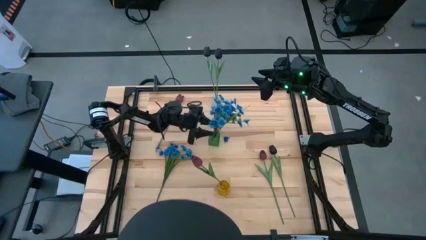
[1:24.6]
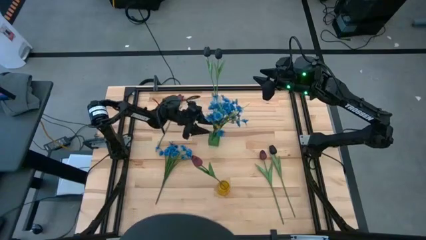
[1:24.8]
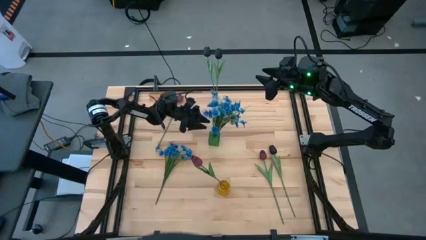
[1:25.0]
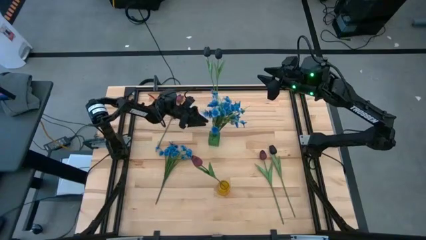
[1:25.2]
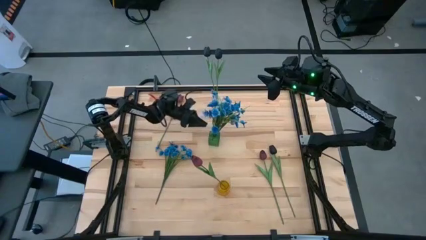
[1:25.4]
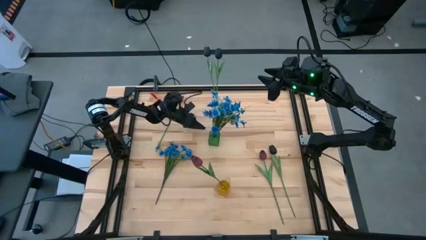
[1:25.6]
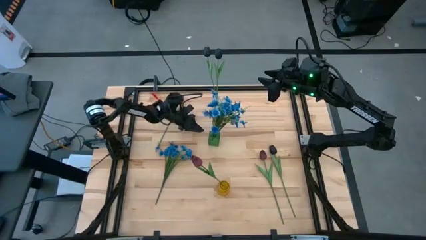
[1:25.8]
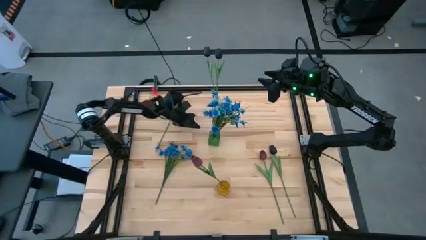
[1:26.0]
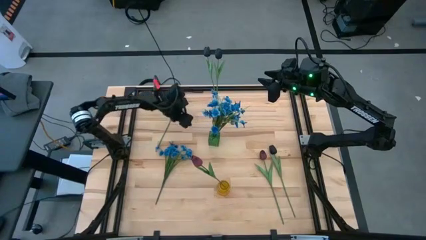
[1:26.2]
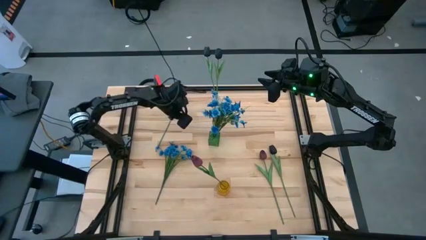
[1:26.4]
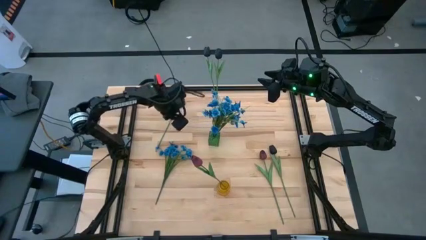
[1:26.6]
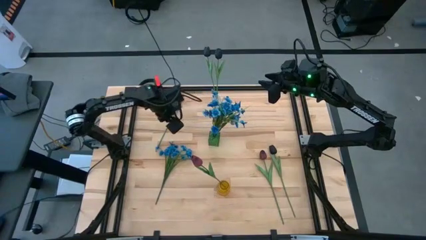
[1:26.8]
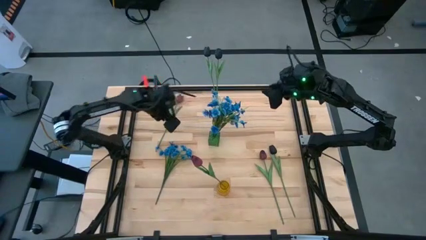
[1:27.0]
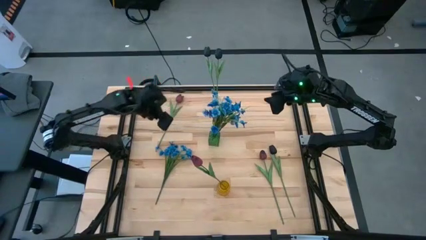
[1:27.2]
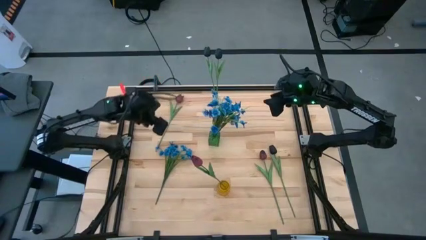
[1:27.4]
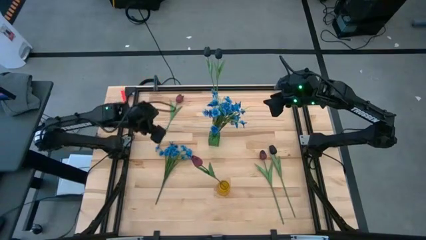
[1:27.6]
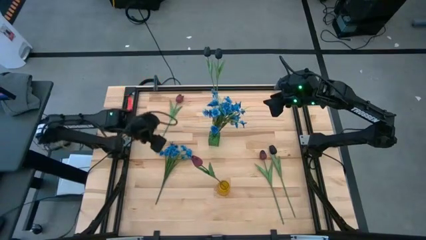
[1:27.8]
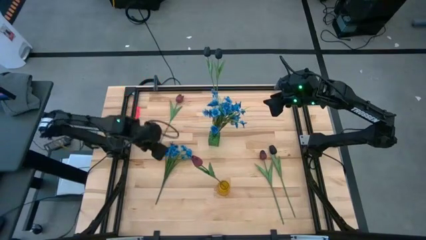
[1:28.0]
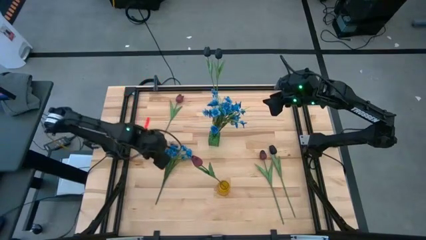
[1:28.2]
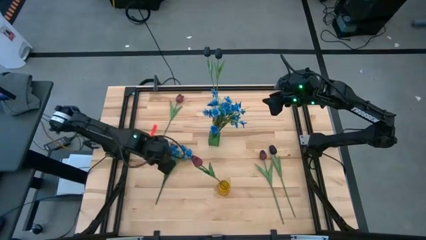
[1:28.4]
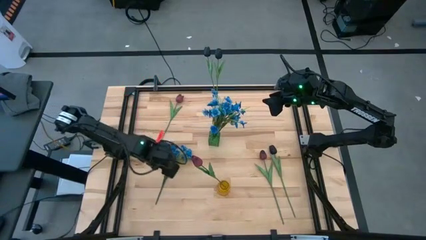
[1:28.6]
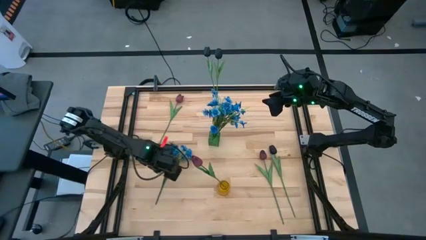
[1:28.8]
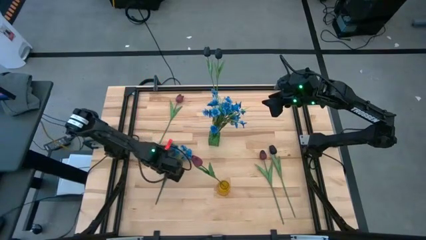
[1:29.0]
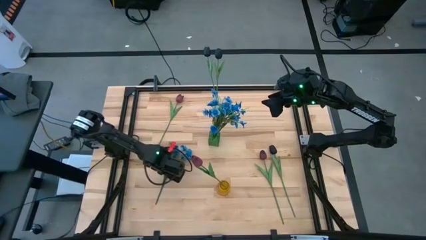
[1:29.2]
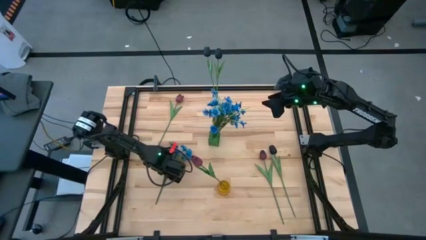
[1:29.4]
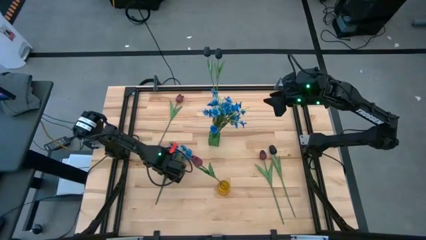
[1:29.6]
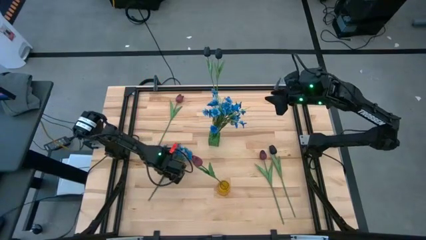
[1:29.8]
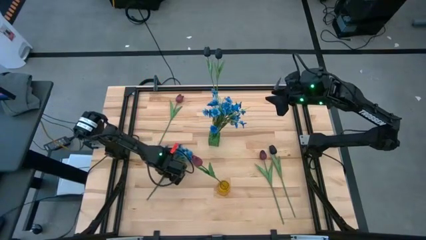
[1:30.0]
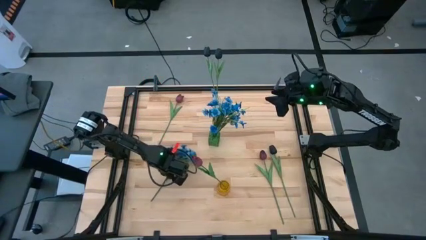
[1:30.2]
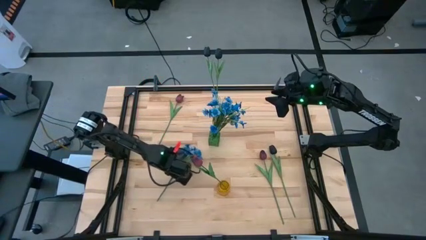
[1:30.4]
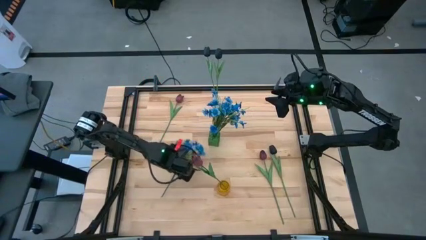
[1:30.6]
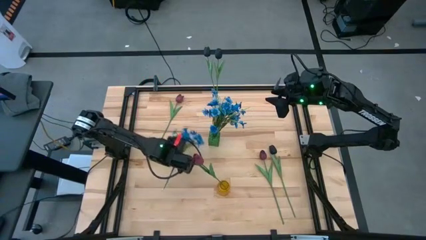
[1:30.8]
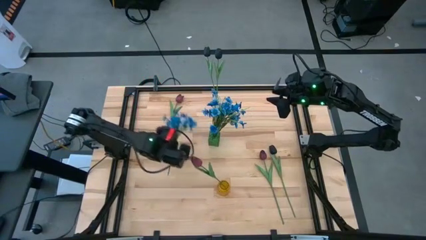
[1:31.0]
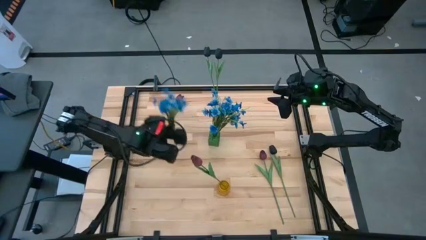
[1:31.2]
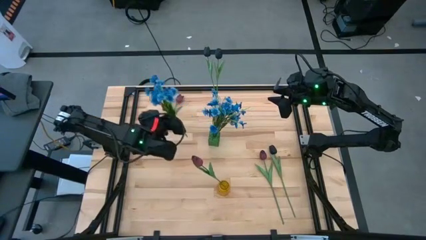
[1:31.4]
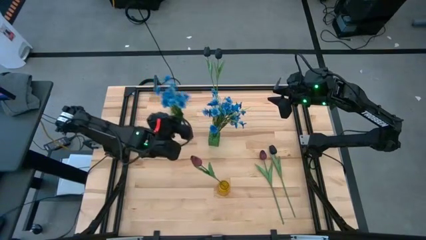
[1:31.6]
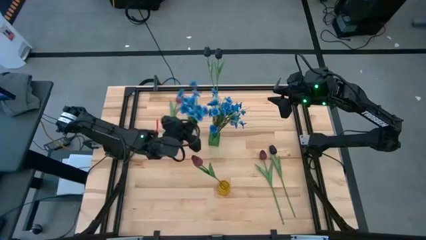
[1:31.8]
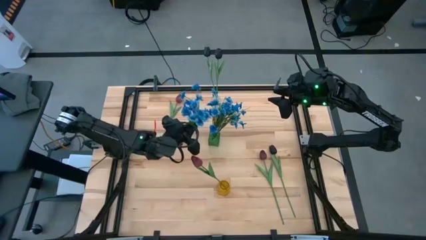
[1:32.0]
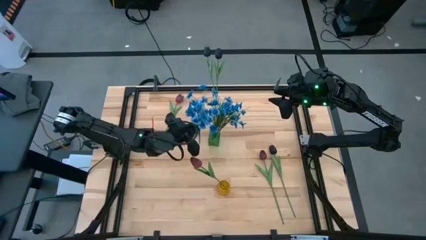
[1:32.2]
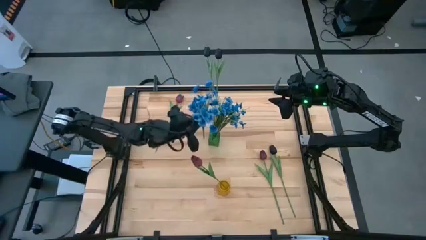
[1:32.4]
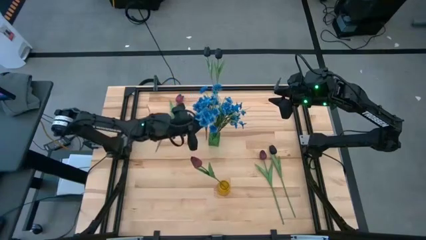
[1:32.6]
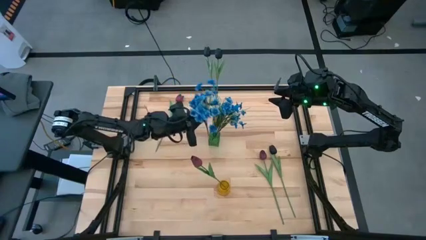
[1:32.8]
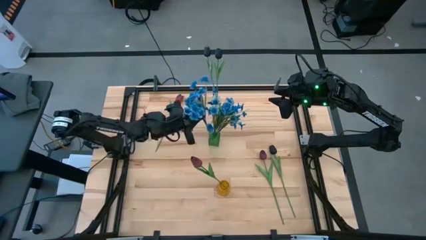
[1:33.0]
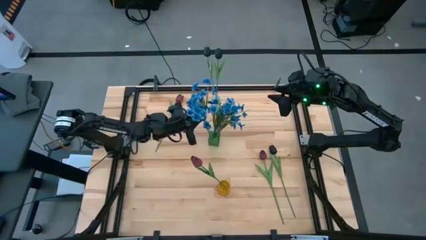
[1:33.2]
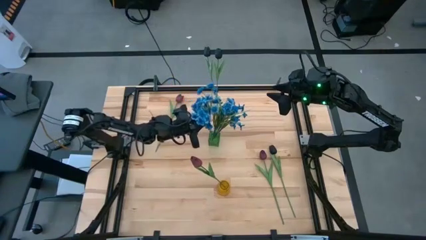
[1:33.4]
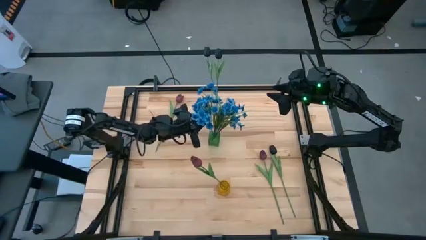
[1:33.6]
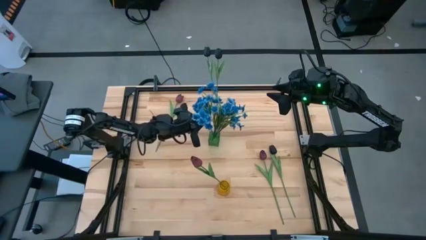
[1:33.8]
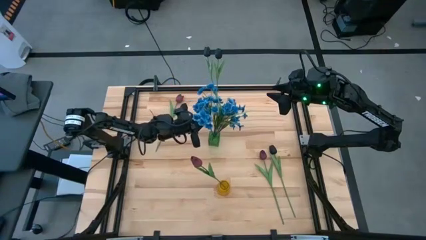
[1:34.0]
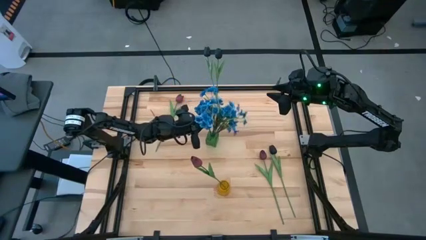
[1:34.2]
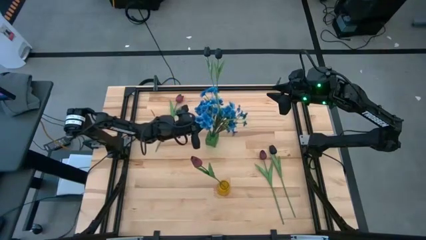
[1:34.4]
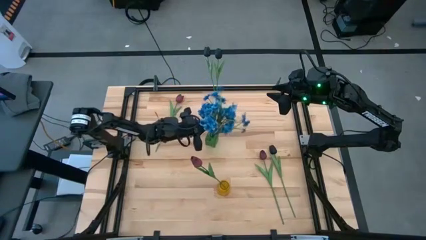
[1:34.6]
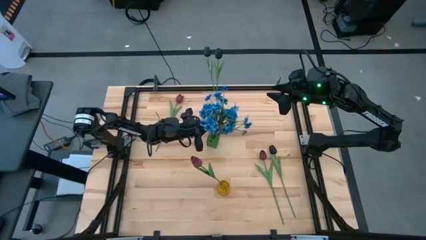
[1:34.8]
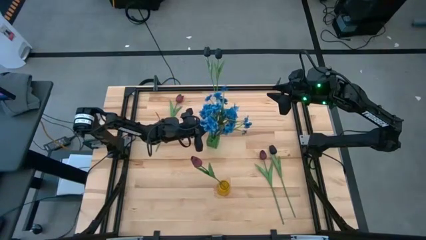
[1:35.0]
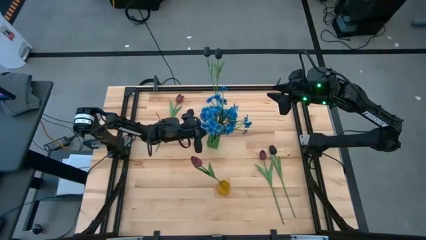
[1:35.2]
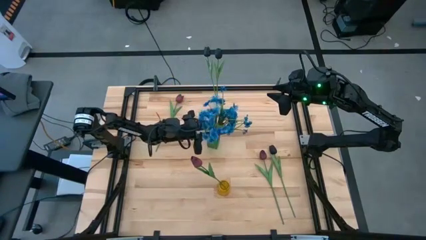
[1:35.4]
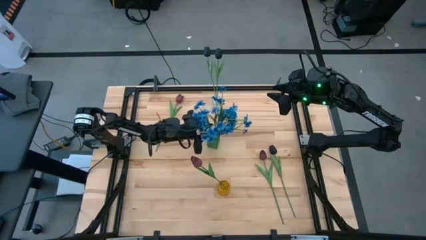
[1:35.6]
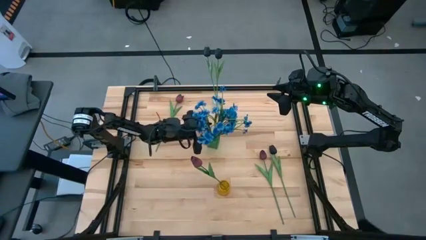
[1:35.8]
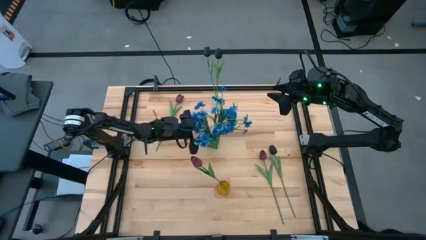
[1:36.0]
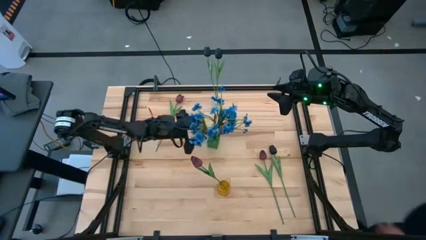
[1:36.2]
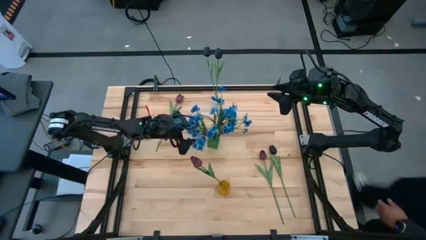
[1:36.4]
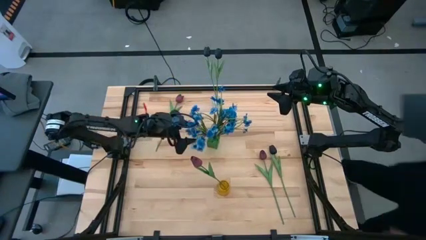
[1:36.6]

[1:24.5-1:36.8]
Task: Sort flowers into vase by color
Put the blue flowers into the green vase
